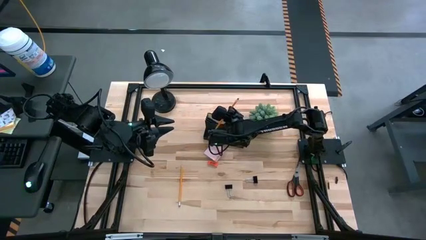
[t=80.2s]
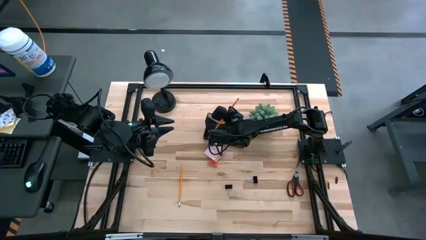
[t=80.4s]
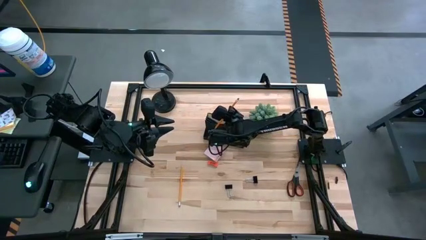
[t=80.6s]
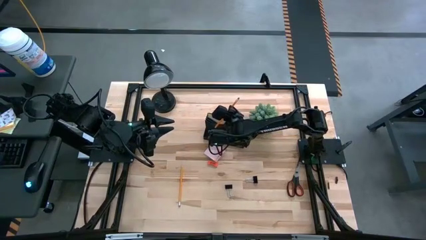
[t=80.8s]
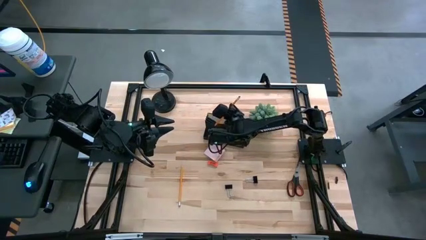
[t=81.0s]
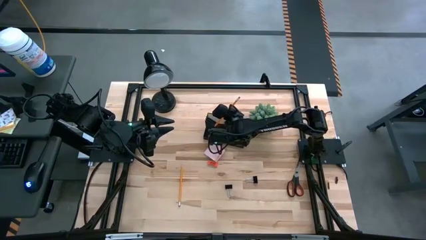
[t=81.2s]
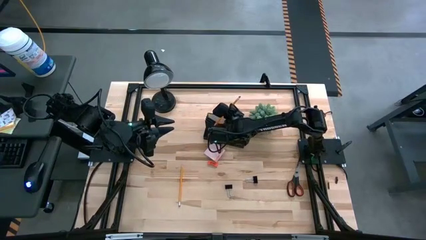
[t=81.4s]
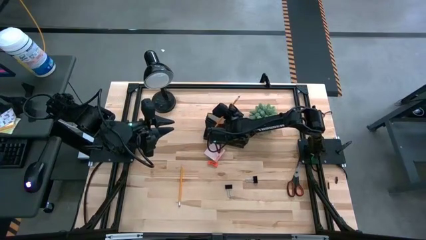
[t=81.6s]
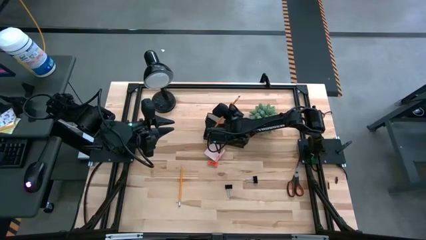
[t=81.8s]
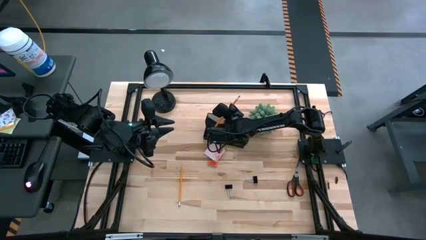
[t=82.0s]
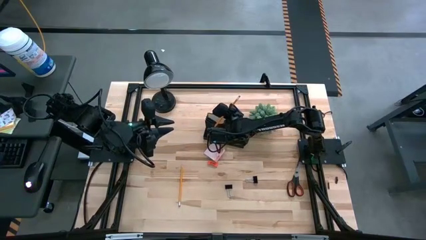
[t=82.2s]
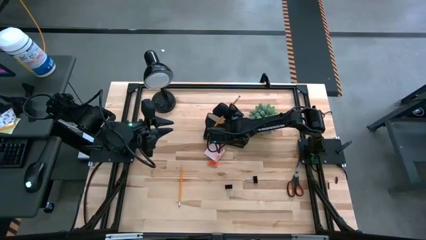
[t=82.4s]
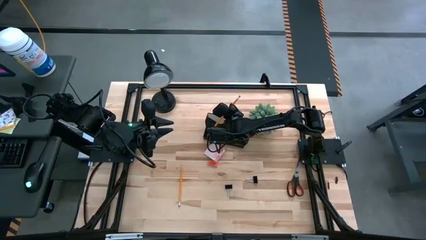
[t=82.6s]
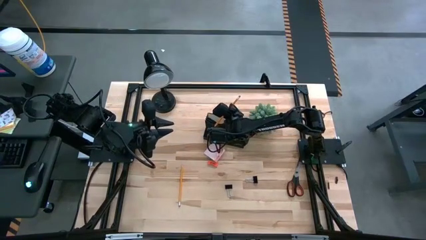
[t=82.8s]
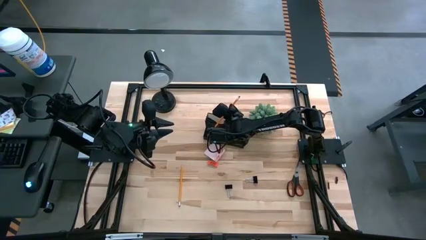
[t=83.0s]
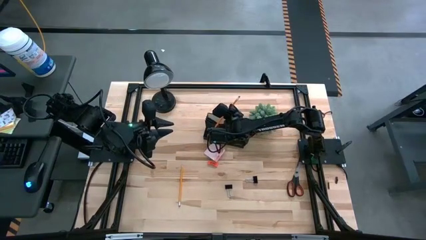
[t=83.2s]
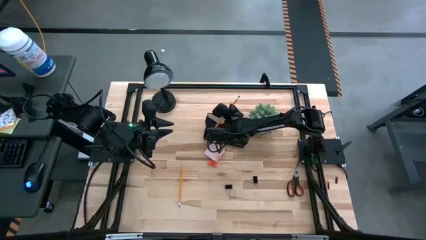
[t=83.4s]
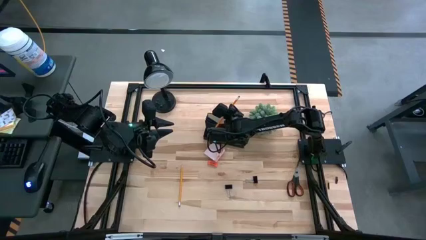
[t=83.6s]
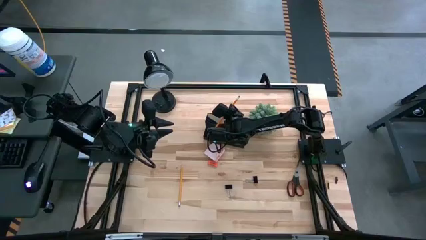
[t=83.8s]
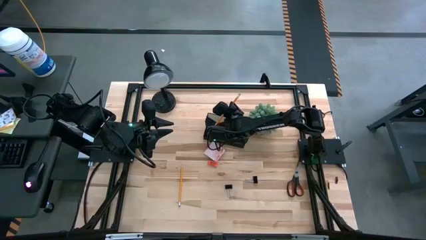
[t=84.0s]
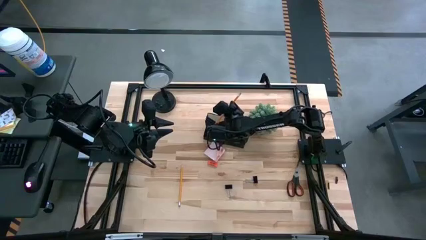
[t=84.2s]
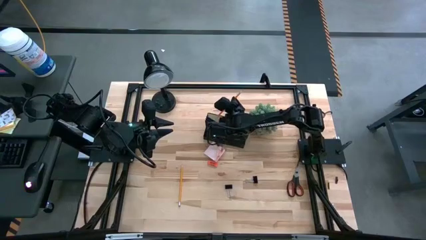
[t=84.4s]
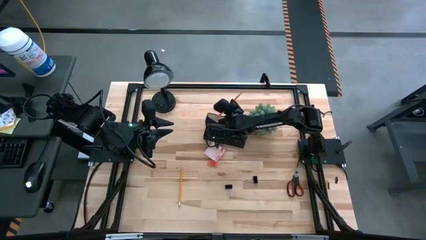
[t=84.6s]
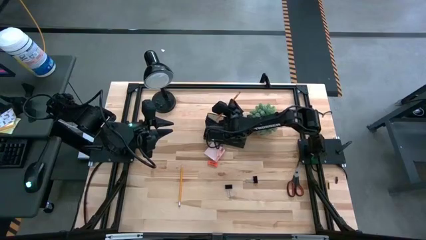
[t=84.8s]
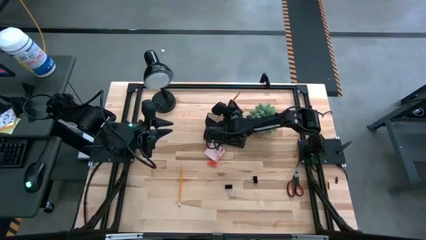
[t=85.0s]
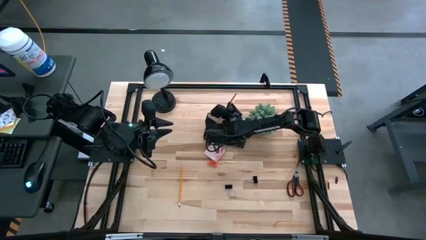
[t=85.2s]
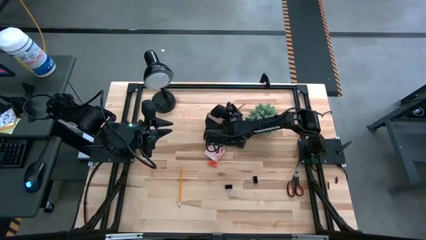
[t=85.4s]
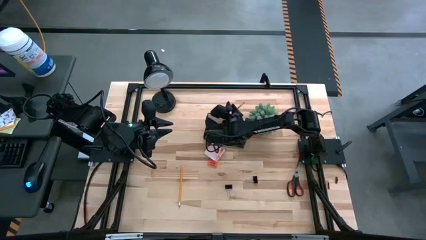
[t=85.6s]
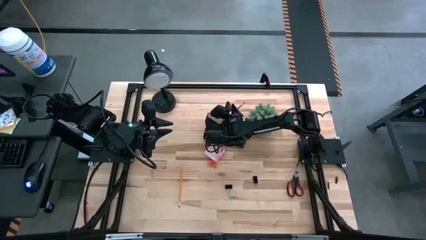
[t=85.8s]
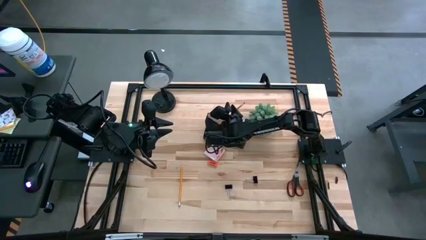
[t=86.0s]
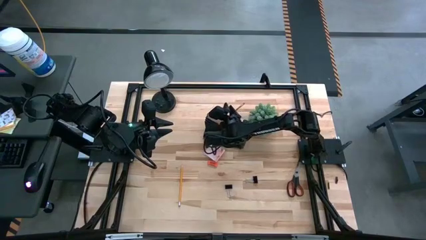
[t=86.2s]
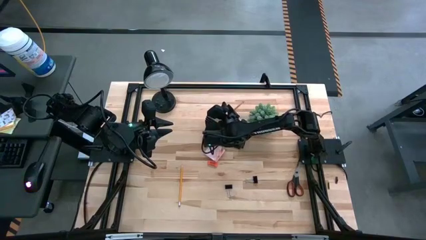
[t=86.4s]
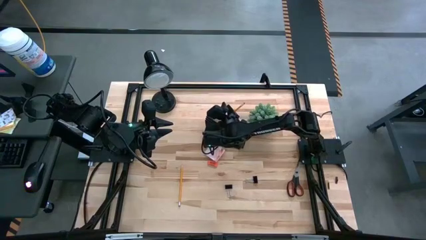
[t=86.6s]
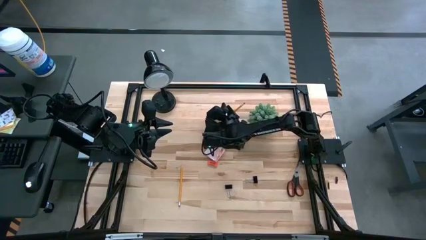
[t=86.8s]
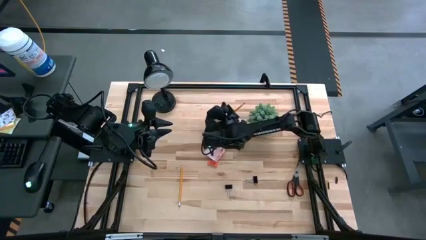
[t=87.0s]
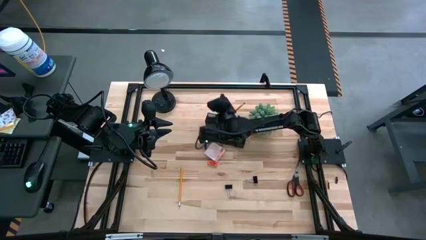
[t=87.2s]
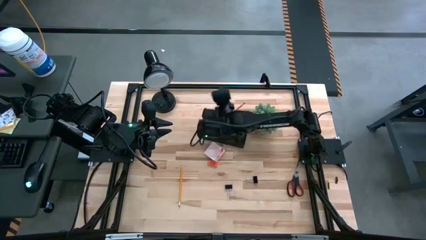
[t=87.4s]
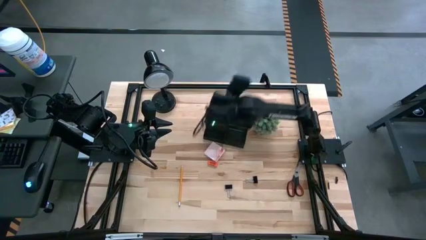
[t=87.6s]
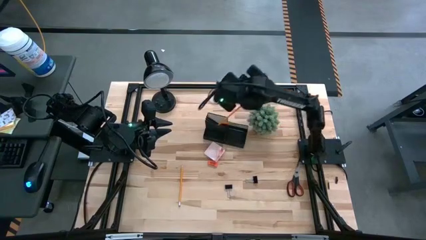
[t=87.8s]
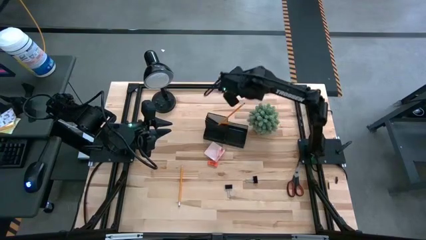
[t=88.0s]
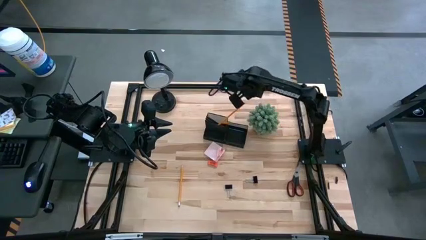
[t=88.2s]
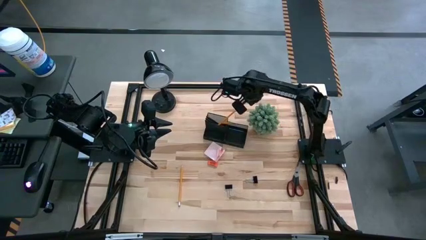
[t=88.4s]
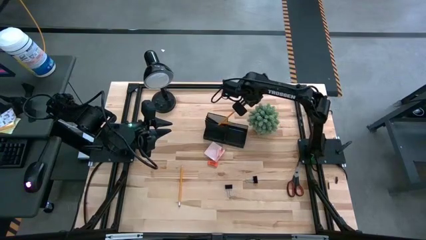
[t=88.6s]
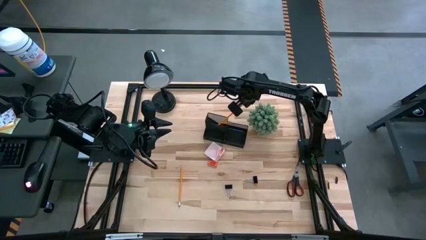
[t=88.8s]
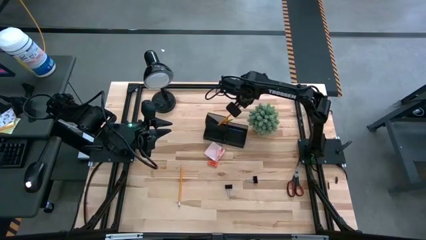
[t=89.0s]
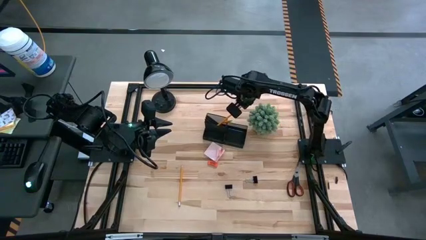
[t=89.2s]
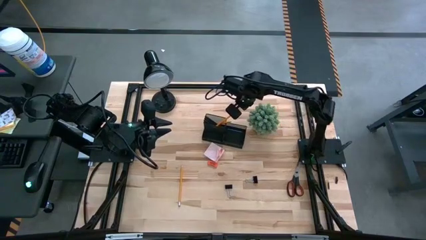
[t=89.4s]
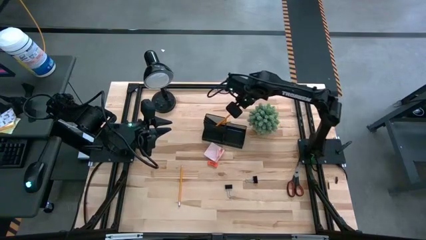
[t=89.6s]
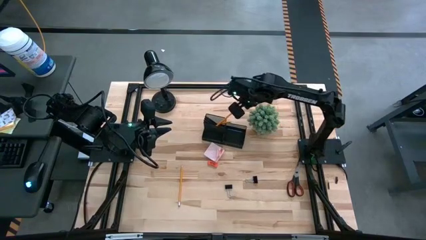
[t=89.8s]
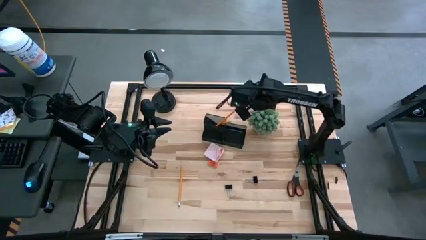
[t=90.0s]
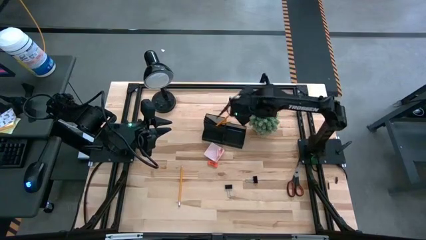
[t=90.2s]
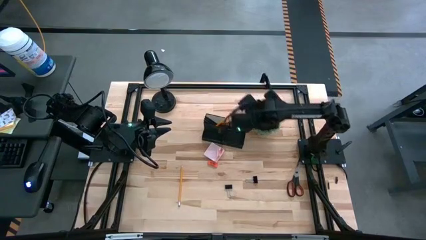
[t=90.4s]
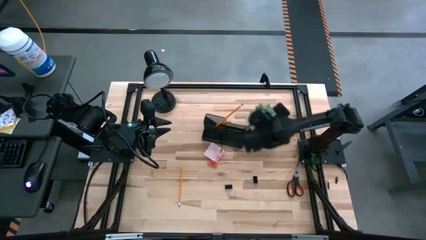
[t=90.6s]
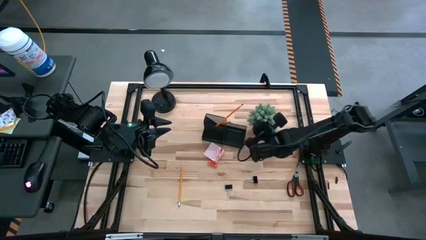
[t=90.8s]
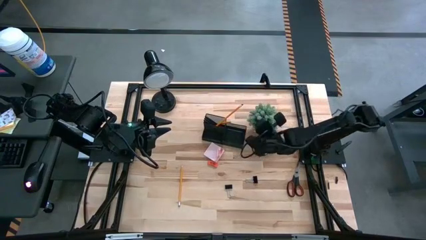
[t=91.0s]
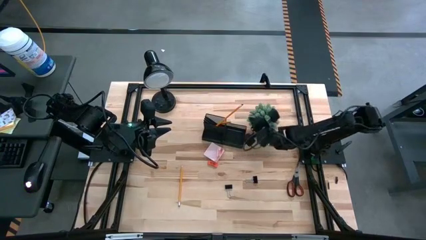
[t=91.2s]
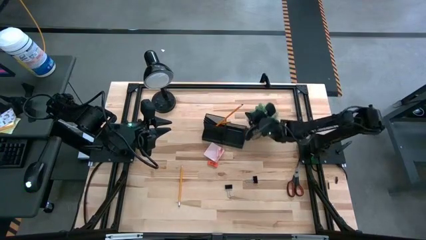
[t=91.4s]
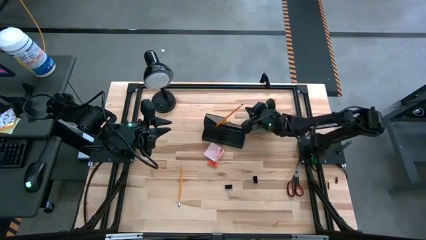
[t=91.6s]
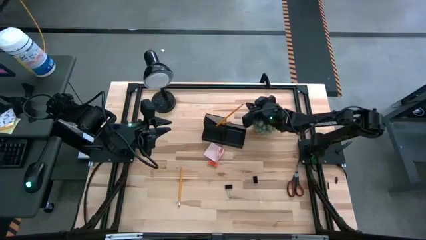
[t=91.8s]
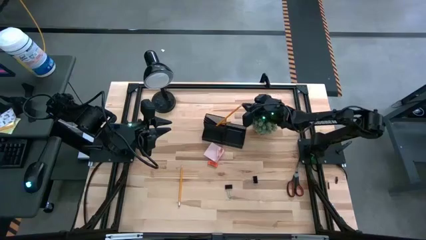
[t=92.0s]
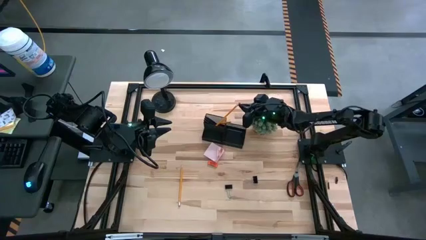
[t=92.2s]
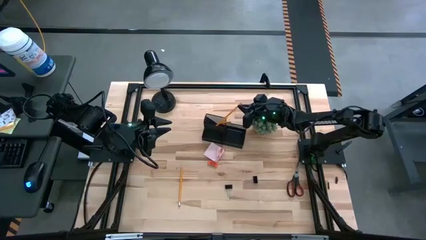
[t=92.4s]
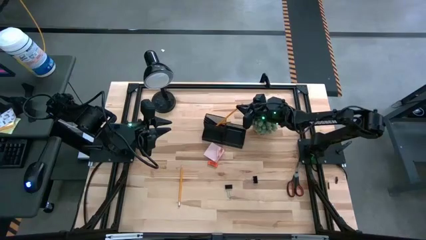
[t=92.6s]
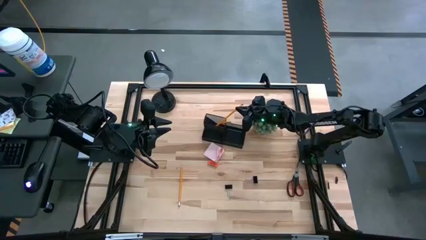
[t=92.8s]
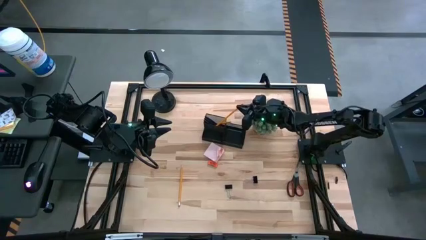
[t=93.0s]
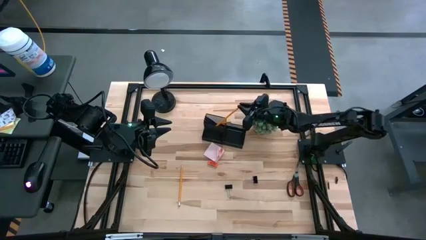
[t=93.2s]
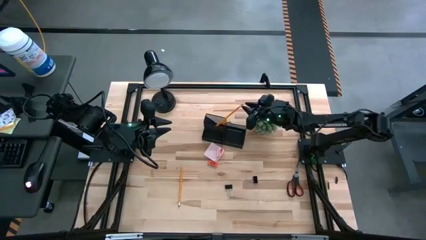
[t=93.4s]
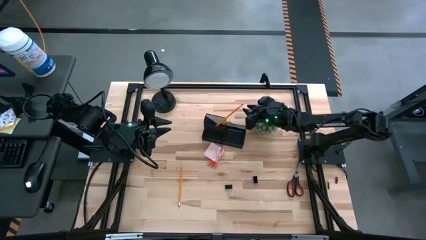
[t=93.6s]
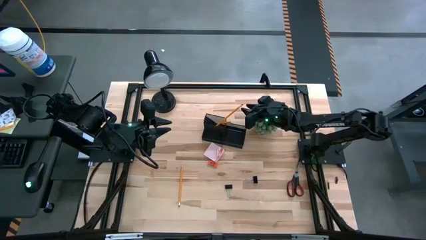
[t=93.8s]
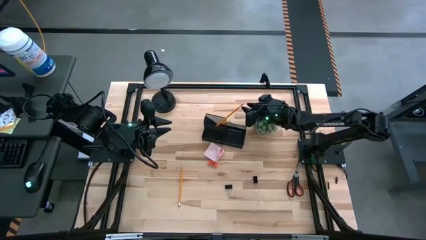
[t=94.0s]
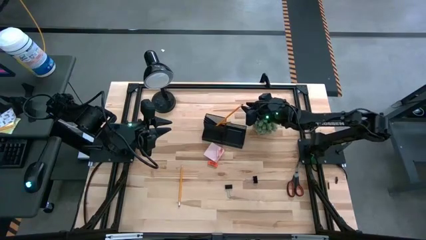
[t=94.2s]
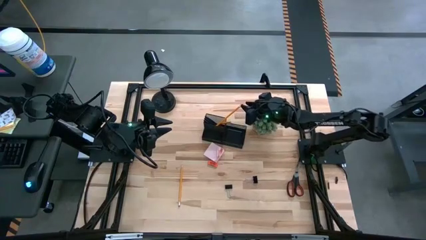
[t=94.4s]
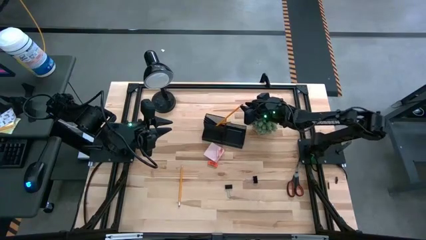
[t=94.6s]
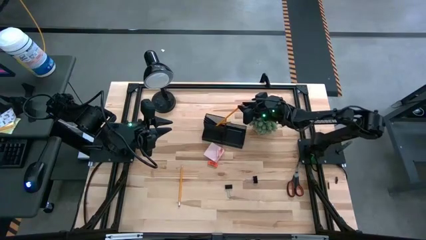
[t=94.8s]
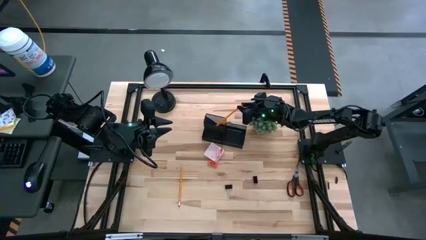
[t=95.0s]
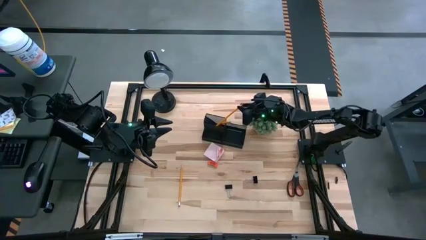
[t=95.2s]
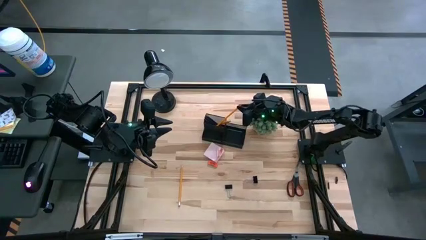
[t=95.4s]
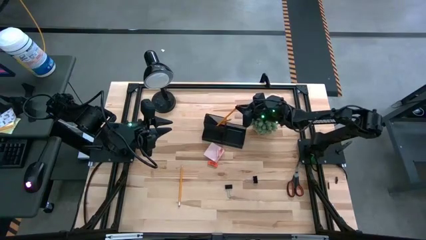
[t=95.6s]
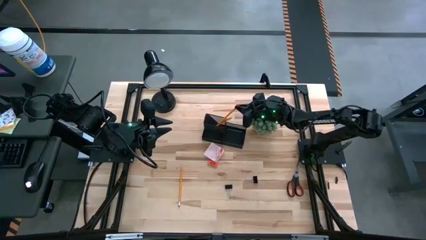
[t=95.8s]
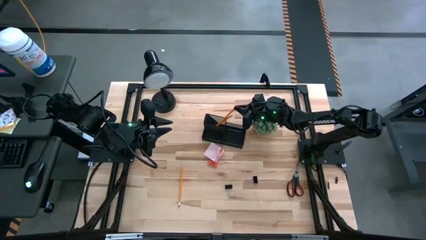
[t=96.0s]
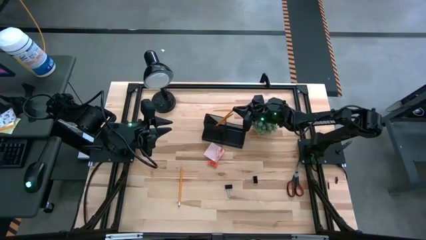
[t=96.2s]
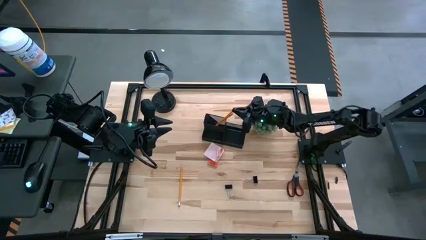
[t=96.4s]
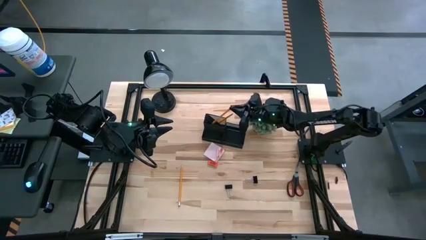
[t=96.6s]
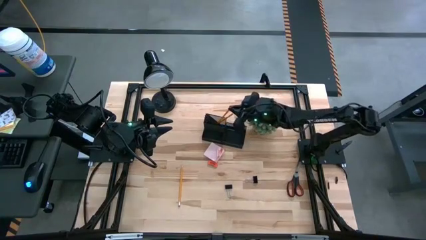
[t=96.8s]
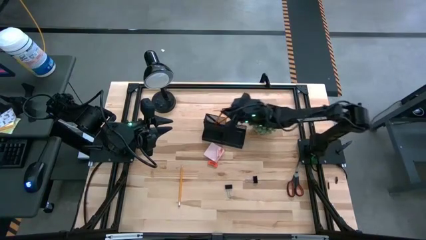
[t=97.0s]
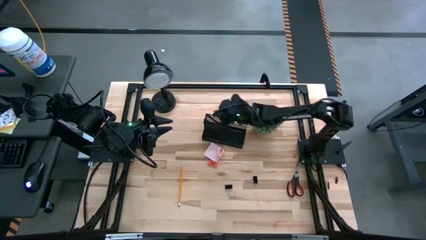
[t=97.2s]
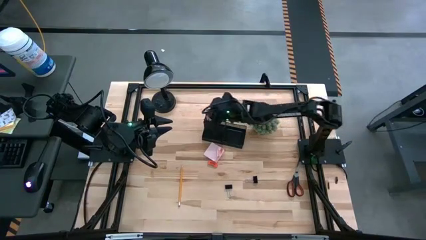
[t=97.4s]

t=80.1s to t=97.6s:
Task: Pick and place office supplies into organizer
Put the right orange pencil into the black desk organizer
